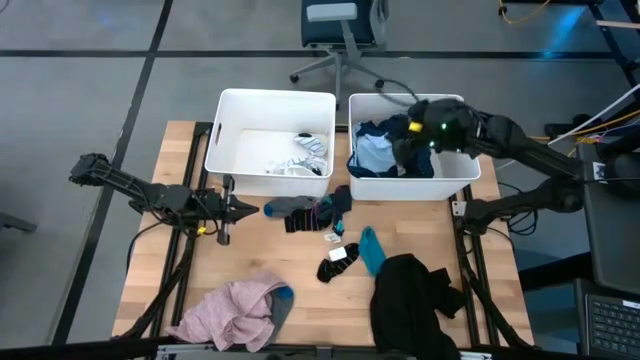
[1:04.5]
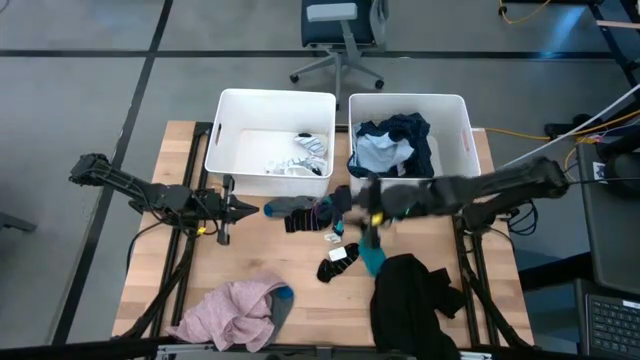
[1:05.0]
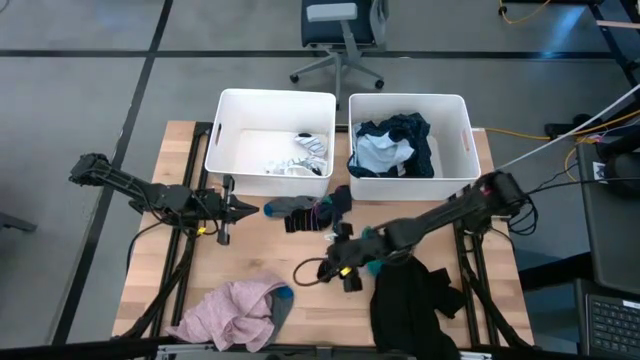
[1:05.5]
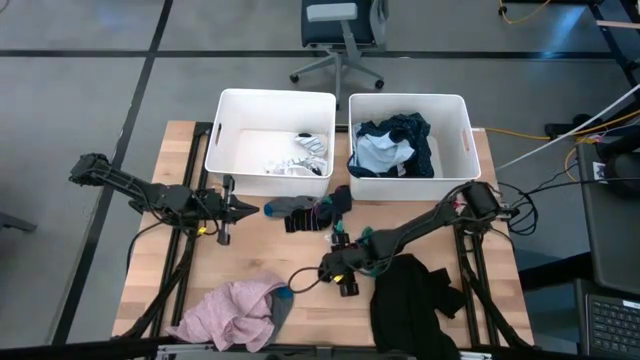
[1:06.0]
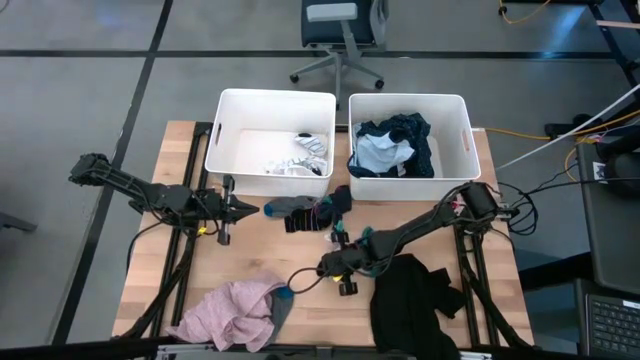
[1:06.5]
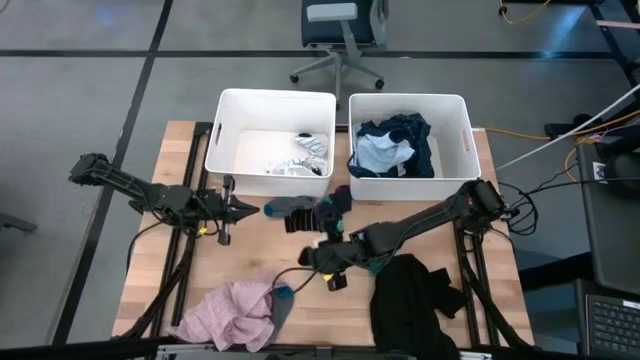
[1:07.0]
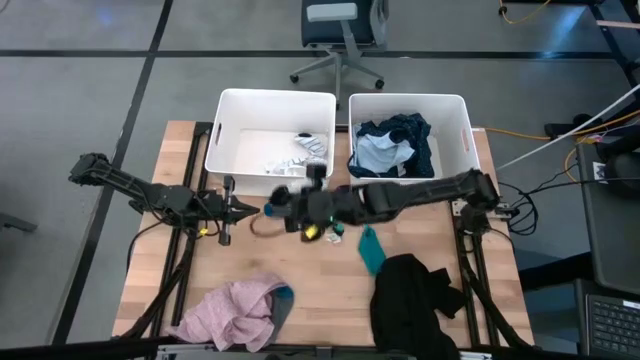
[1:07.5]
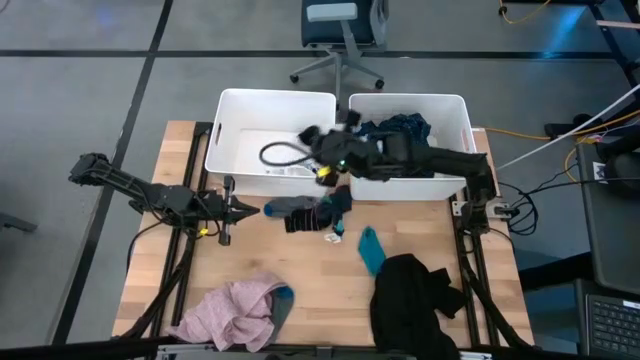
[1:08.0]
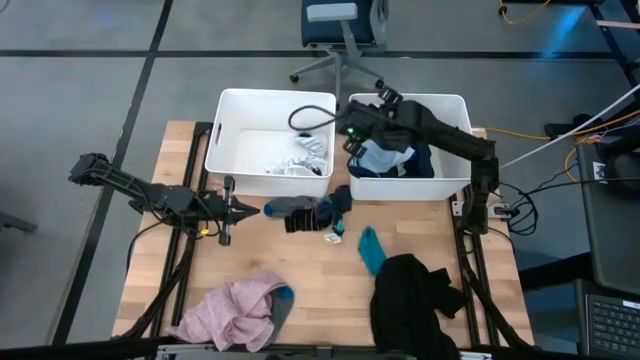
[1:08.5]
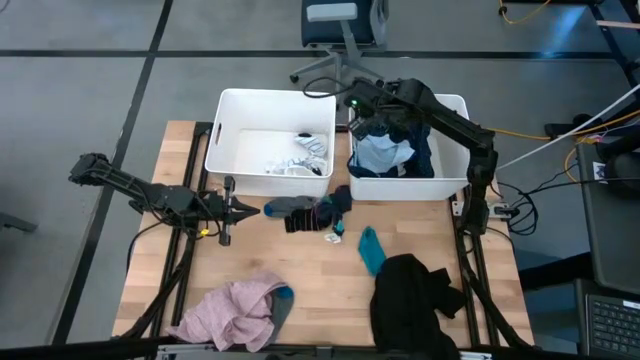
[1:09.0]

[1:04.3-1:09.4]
Task: Sort clothes
Put the black stripe sock into the right white bin

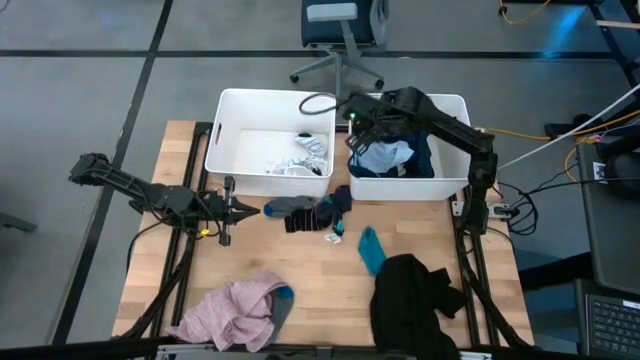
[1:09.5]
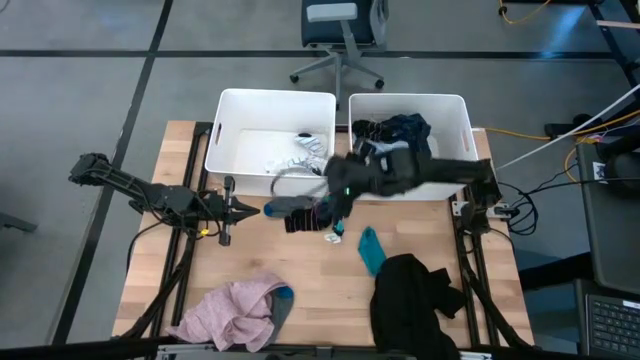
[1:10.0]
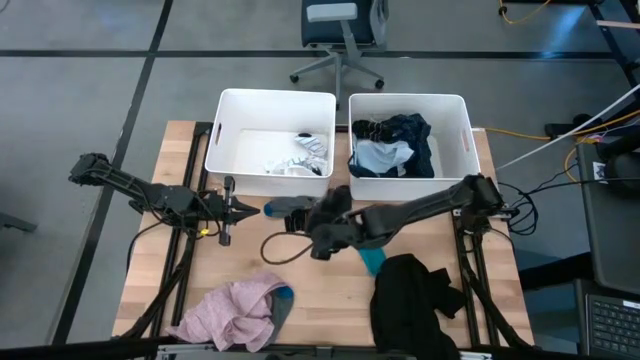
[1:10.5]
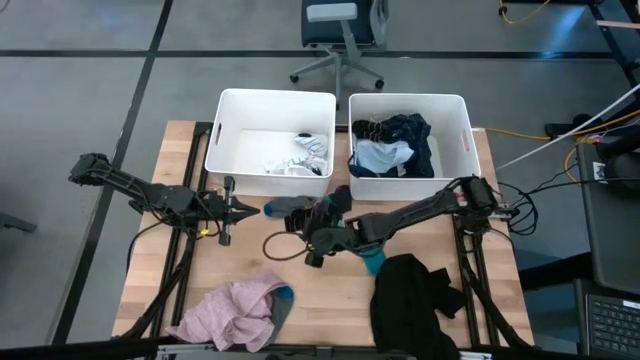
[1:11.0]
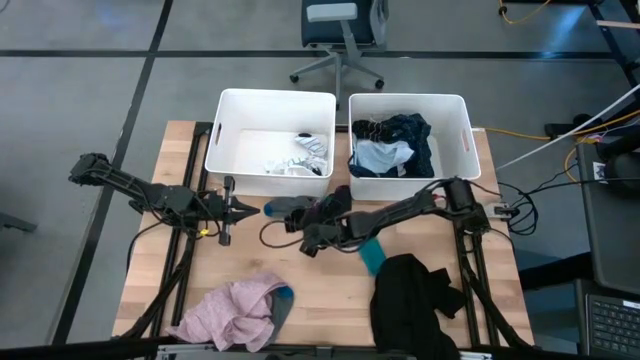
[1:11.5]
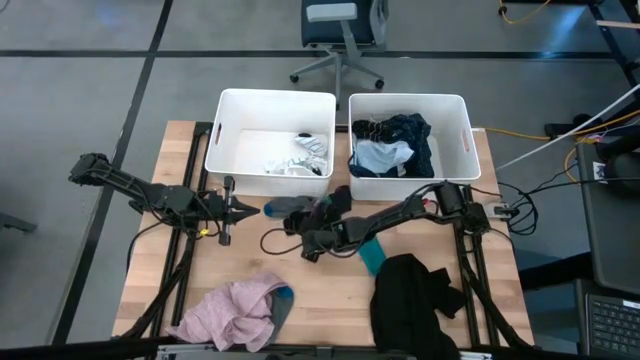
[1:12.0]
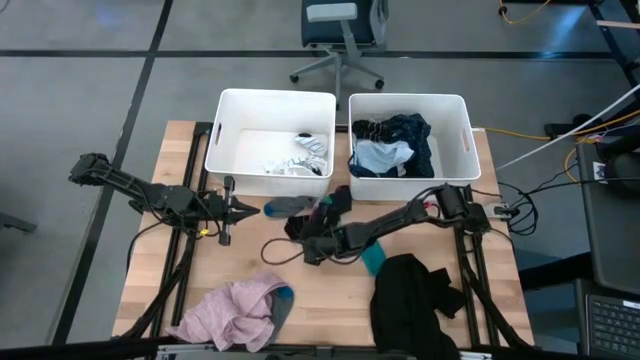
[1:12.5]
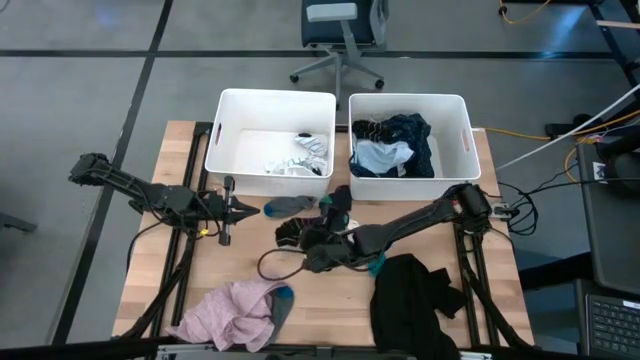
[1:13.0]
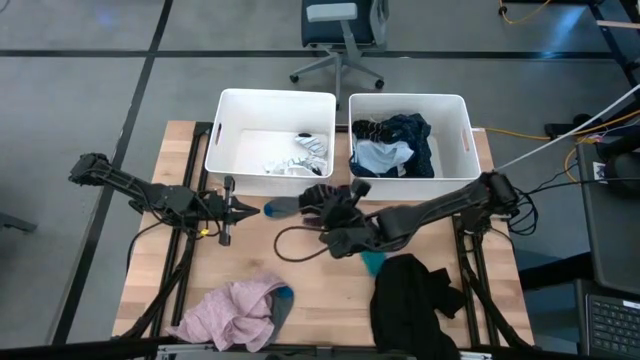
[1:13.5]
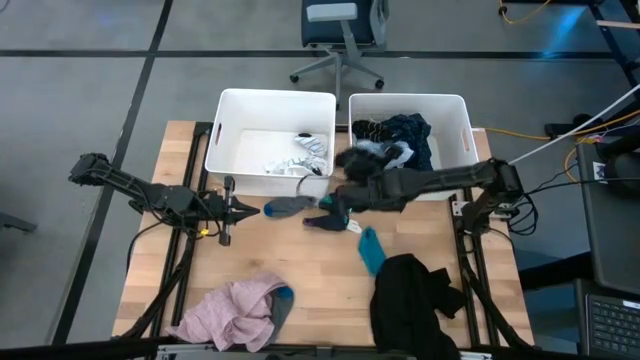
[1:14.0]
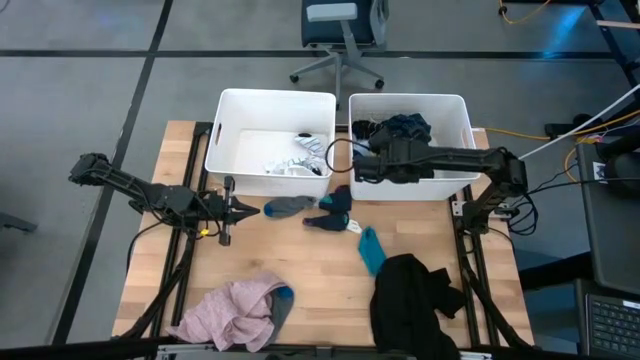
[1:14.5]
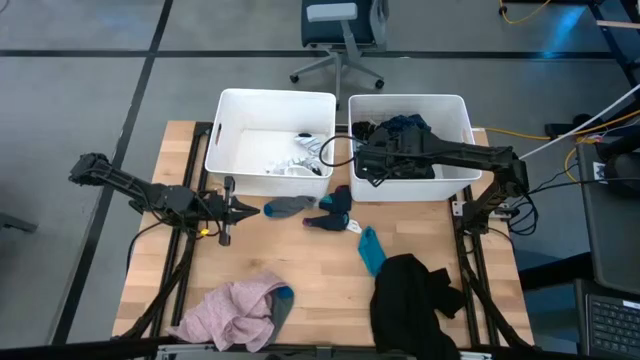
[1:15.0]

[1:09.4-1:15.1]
Put the black stripe sock into the right white bin

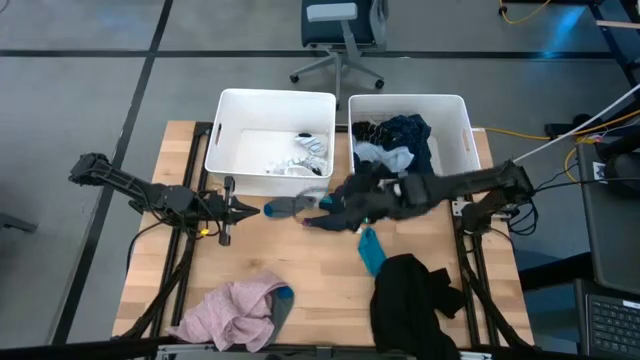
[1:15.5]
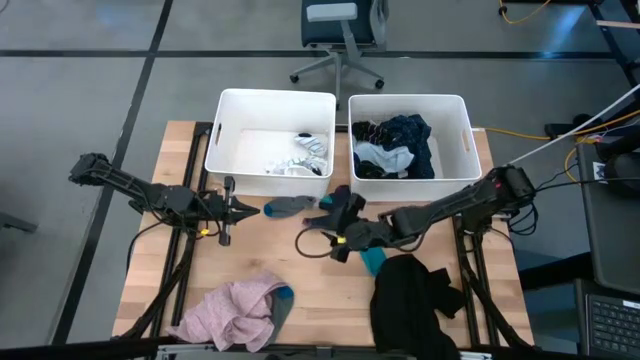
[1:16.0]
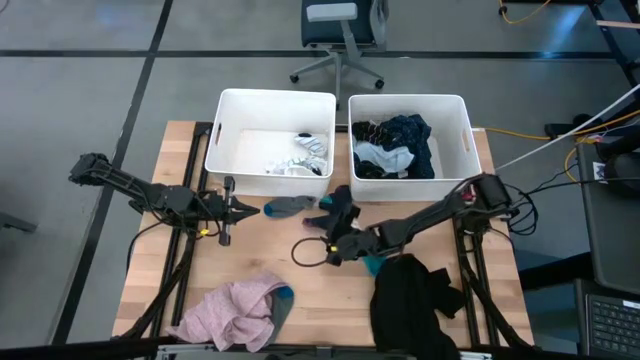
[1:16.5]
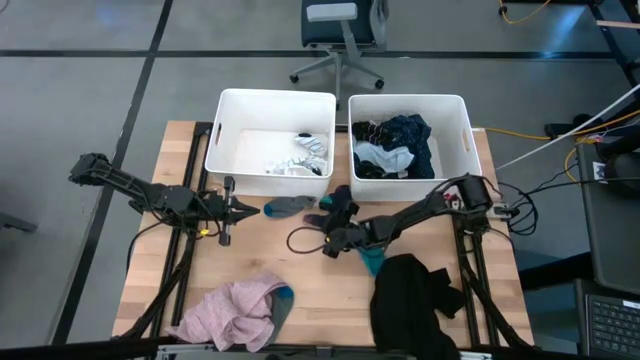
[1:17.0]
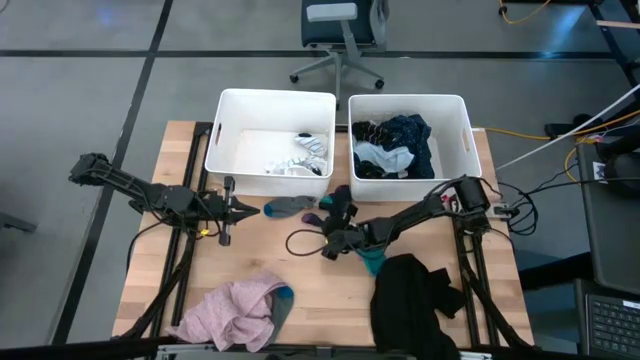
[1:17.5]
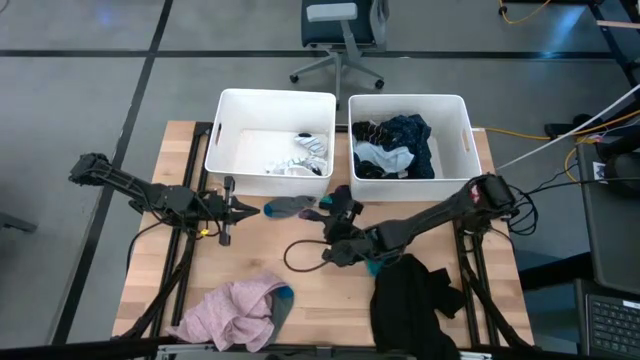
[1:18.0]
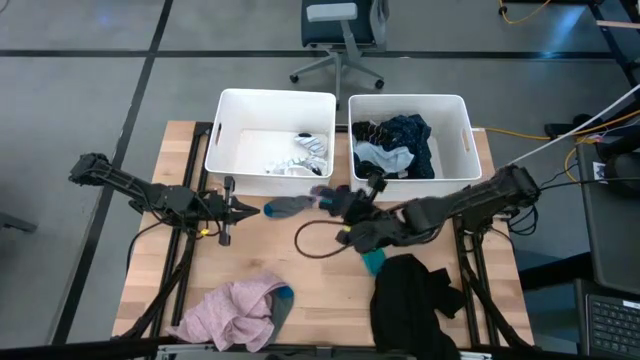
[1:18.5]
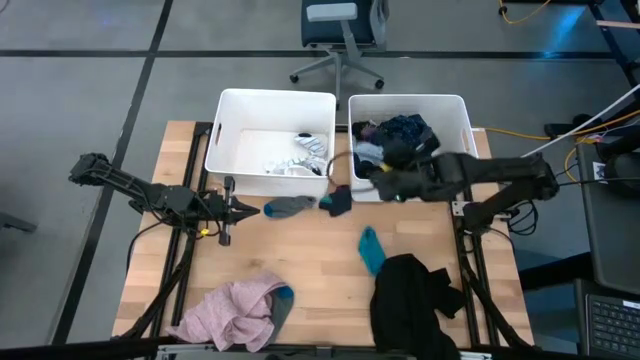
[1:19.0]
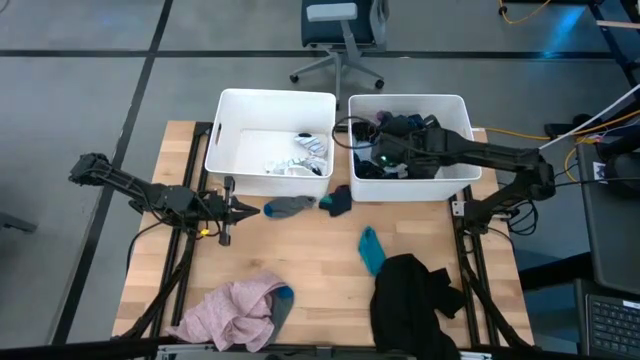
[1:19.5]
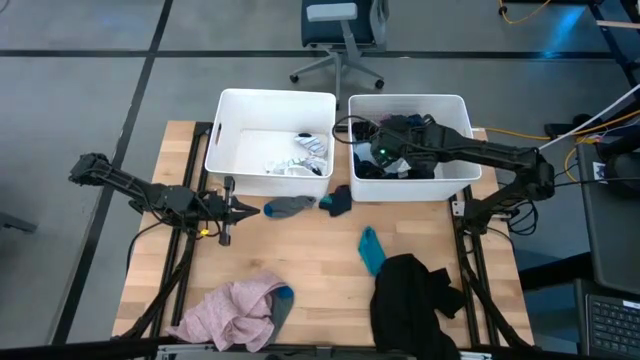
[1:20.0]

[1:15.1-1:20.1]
Put the dark blue sock into the right white bin

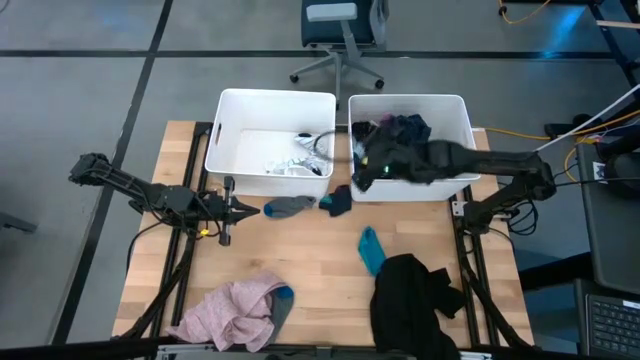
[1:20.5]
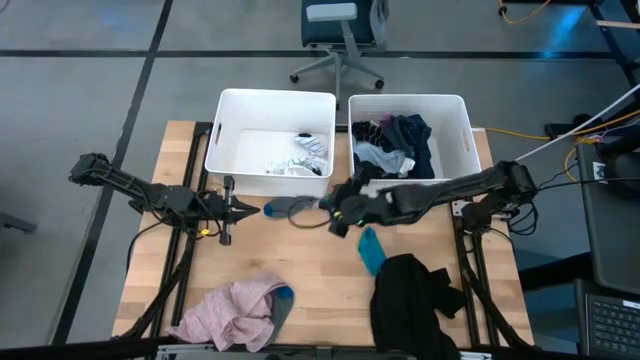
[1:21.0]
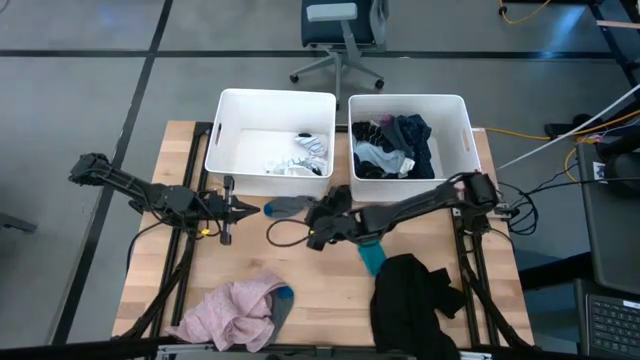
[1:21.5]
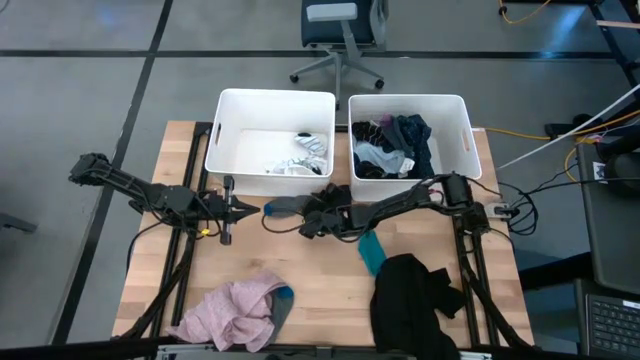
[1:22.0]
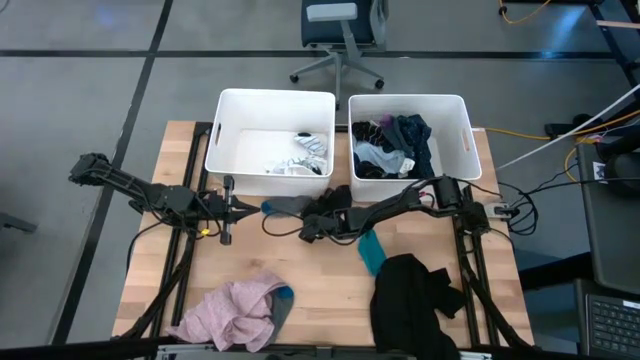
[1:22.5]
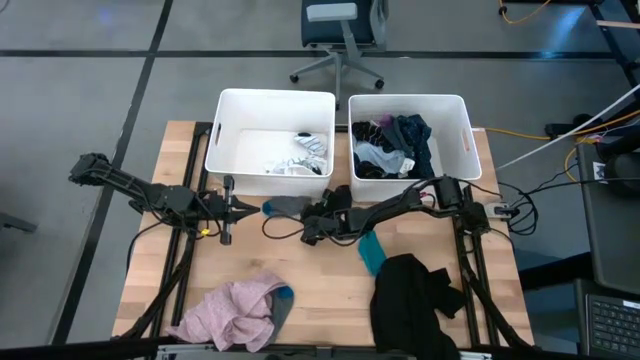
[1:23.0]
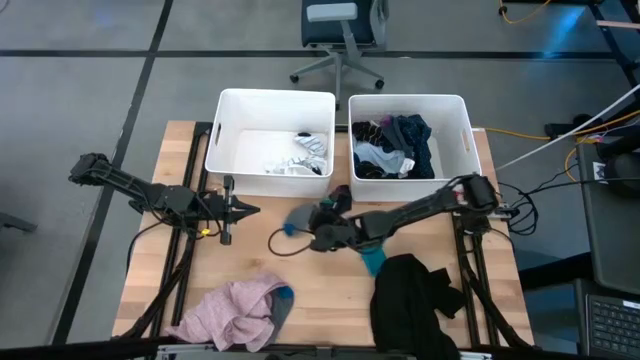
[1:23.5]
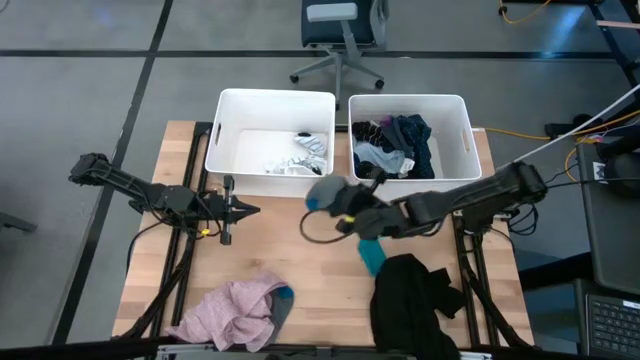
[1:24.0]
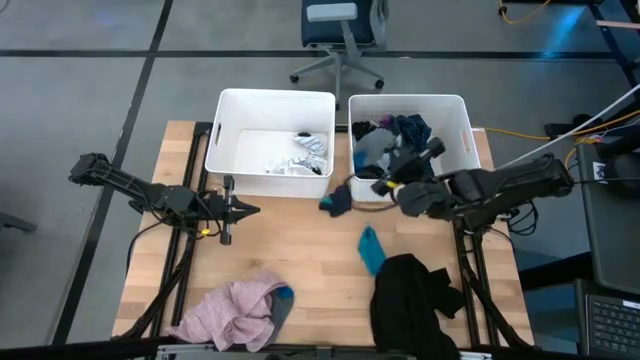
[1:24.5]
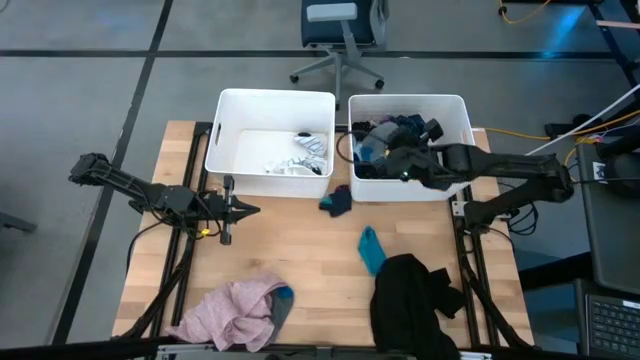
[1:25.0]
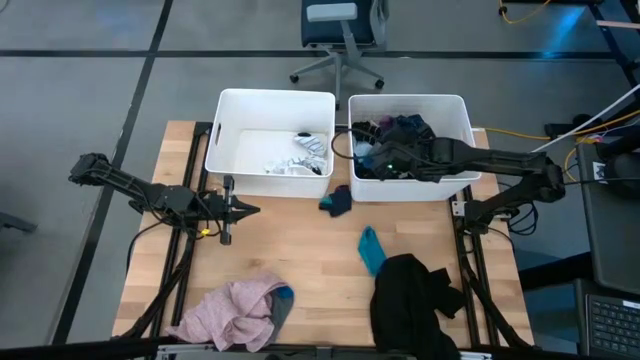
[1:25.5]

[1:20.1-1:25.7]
Put the gray sock into the right white bin
